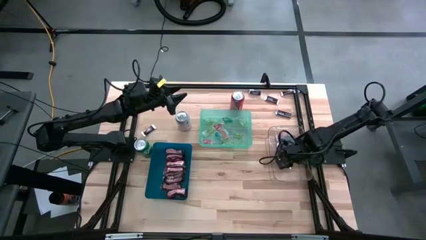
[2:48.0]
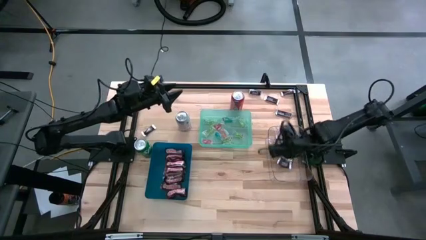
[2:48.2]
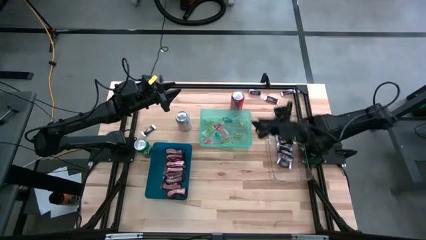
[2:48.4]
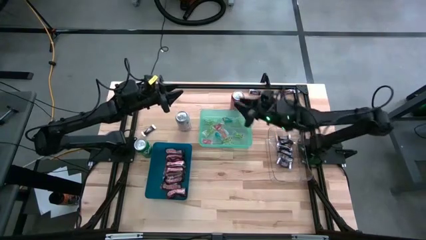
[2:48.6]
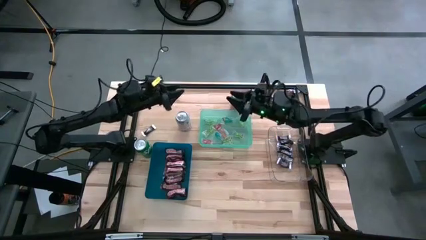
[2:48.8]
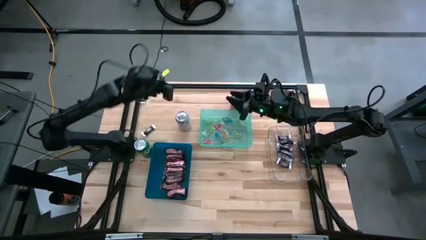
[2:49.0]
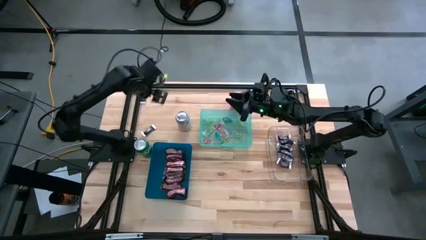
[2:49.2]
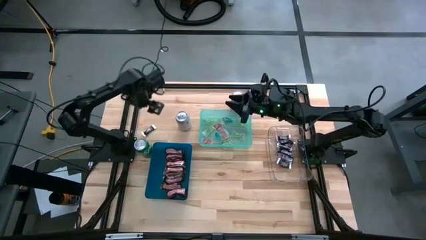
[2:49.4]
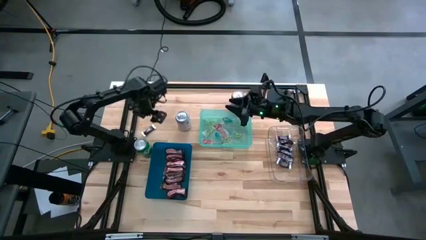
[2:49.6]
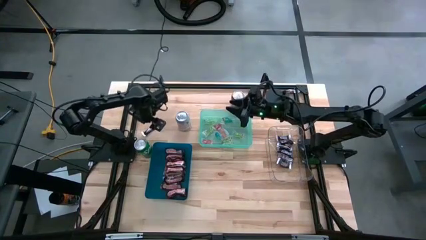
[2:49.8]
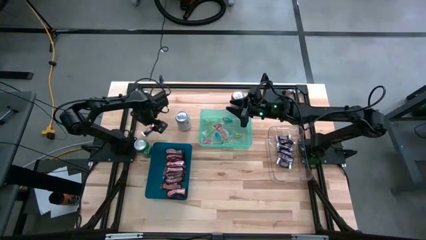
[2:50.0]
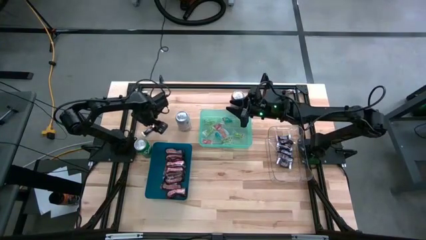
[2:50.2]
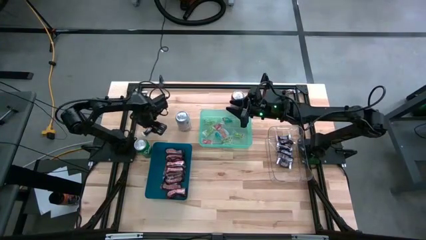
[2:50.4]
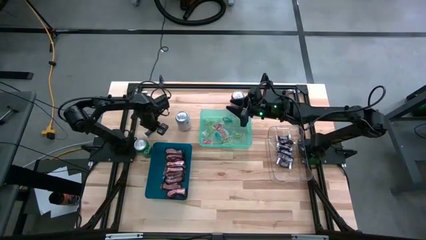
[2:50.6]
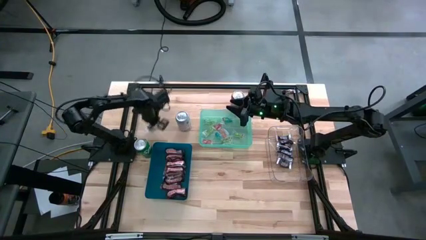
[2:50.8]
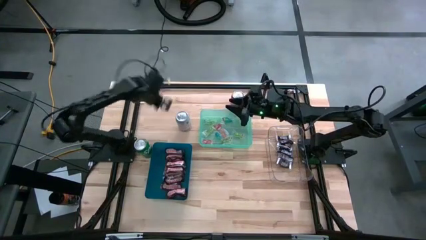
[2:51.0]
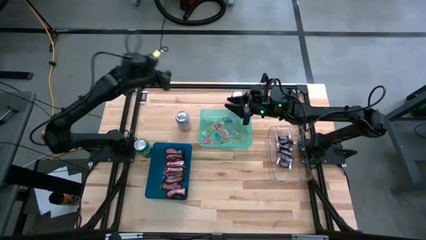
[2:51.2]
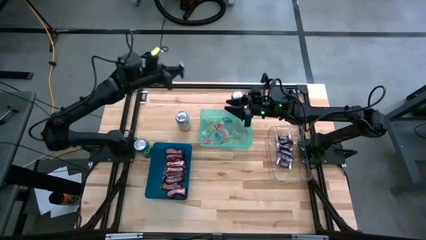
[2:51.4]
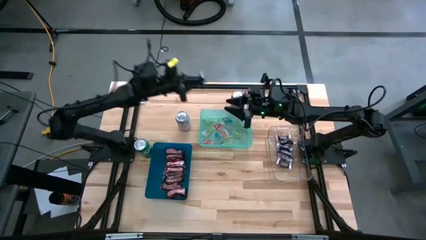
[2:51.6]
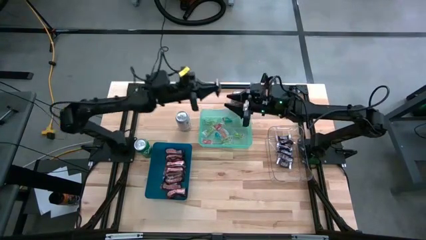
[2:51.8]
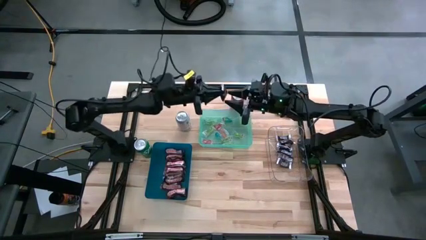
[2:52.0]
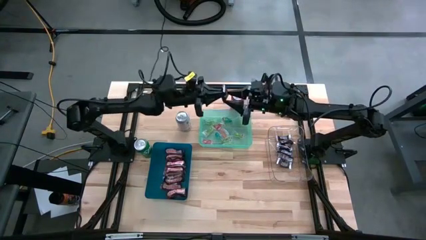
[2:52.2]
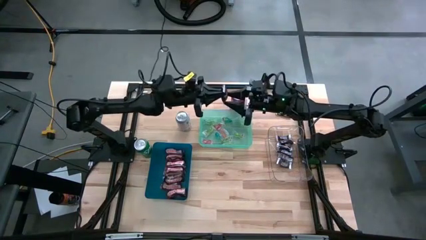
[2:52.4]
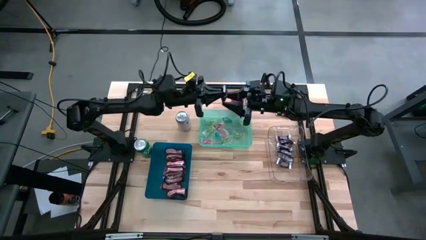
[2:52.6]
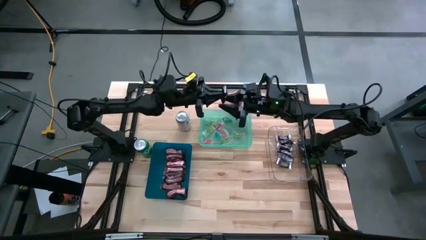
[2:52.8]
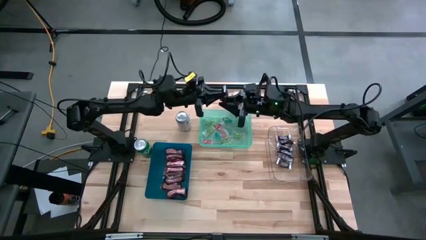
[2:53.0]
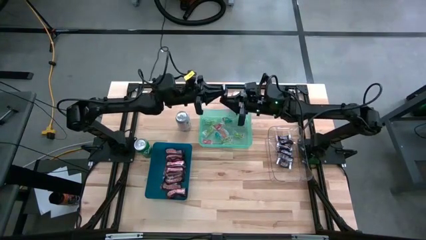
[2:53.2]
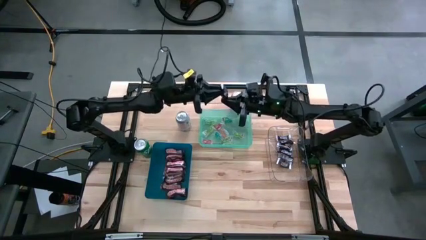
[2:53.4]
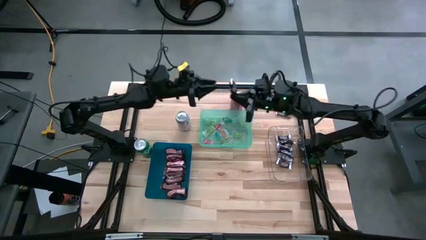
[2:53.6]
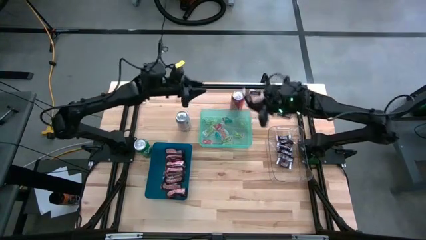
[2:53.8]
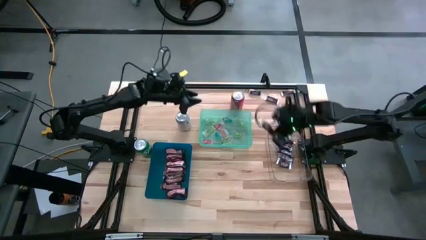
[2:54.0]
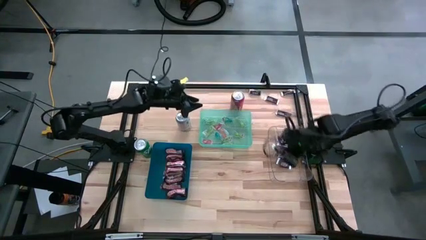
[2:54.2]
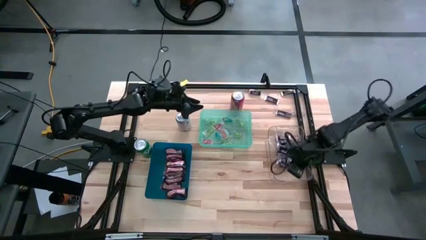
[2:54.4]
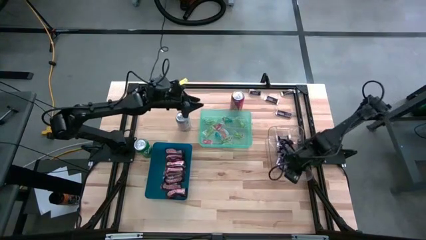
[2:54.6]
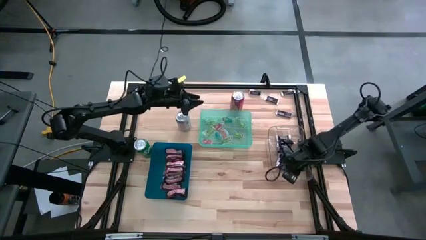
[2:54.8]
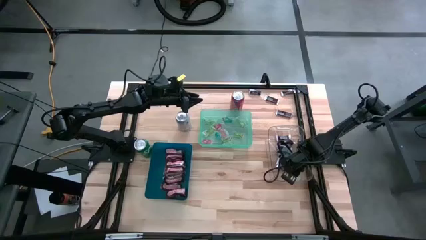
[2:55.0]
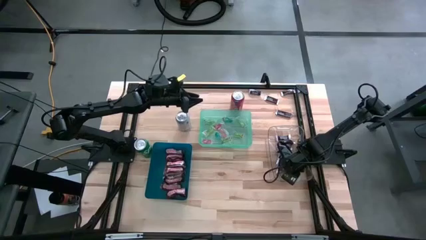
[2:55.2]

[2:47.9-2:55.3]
Task: Organize candy in baskets
Put the white brown chocolate into the transparent bin

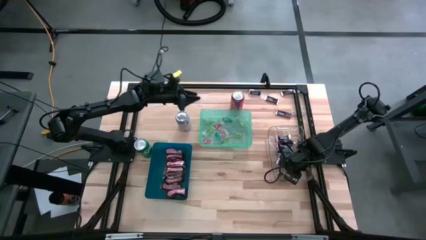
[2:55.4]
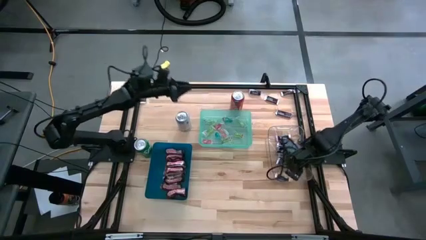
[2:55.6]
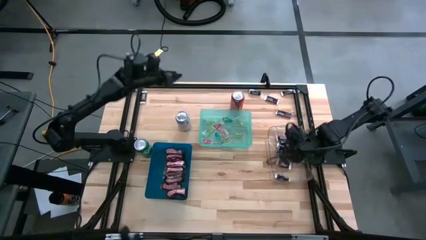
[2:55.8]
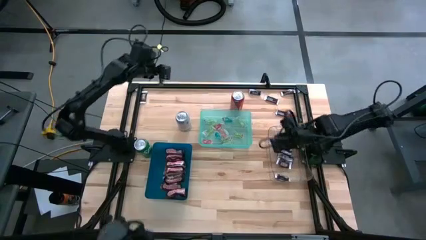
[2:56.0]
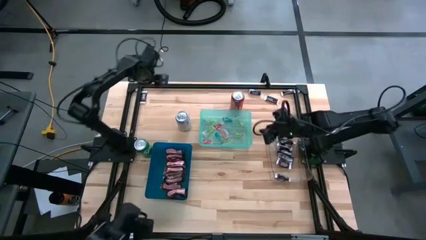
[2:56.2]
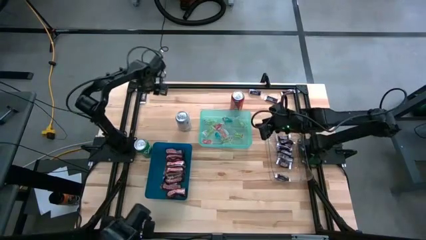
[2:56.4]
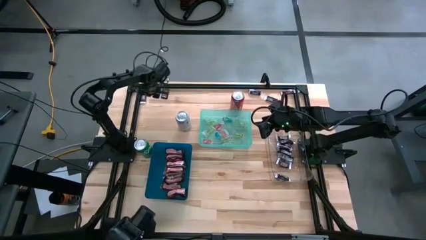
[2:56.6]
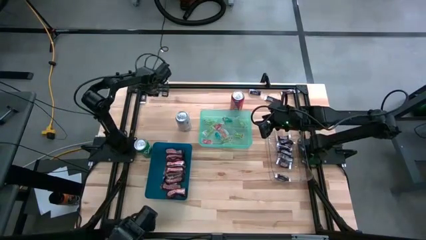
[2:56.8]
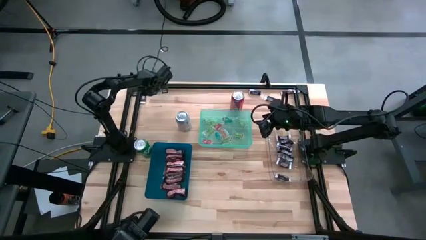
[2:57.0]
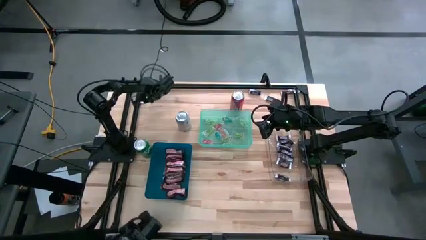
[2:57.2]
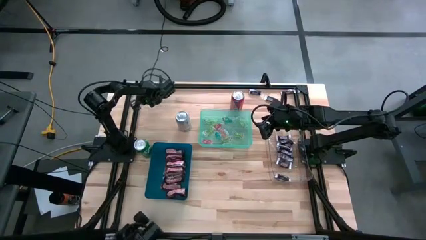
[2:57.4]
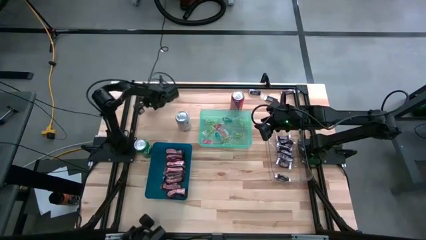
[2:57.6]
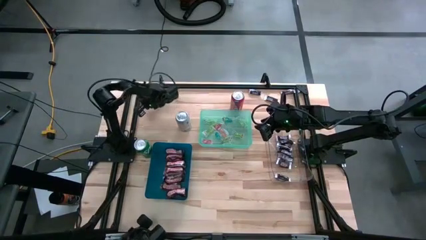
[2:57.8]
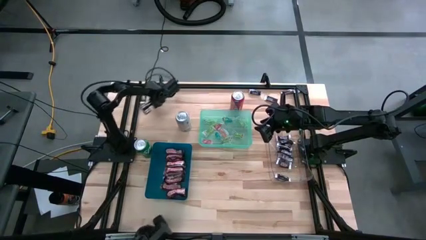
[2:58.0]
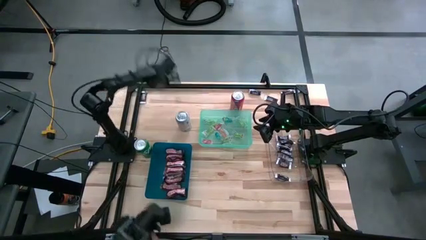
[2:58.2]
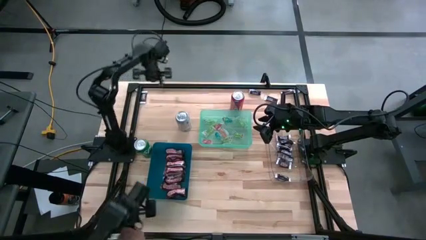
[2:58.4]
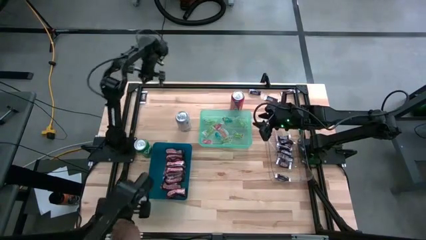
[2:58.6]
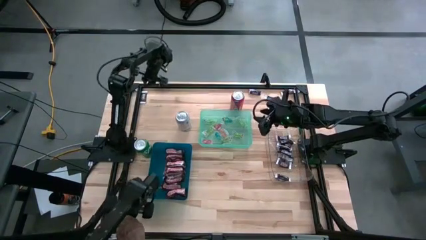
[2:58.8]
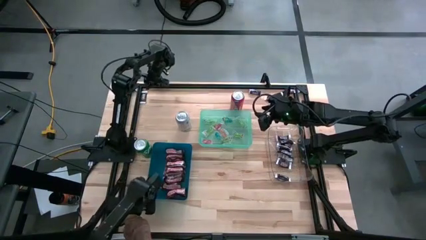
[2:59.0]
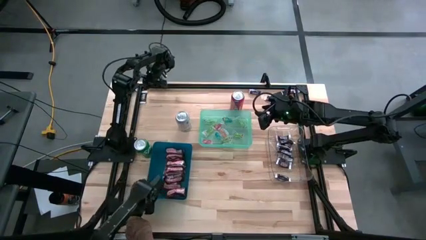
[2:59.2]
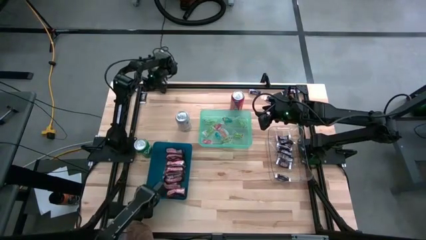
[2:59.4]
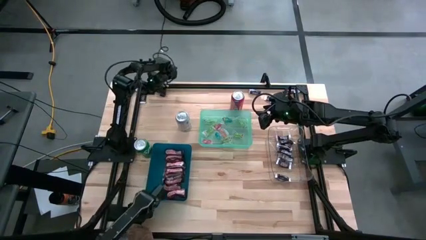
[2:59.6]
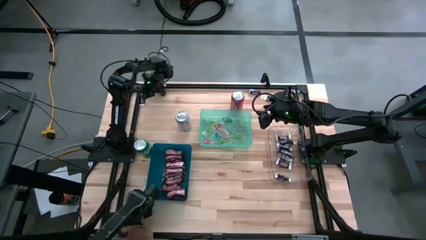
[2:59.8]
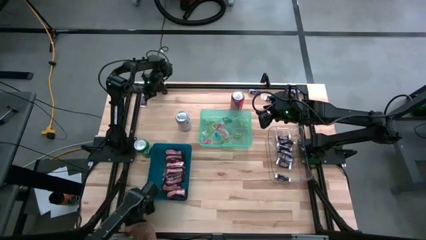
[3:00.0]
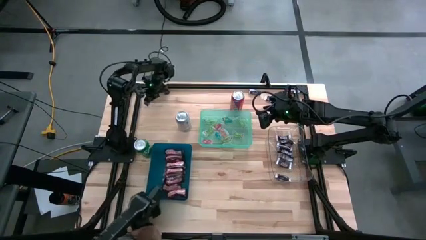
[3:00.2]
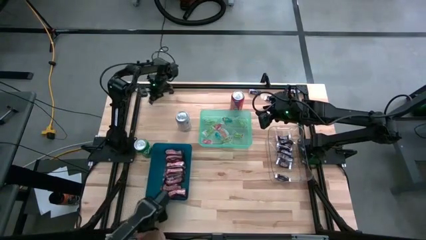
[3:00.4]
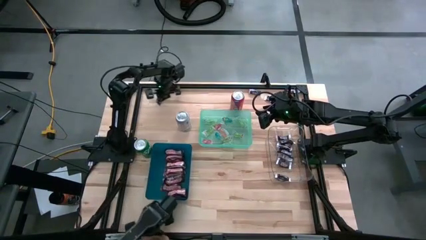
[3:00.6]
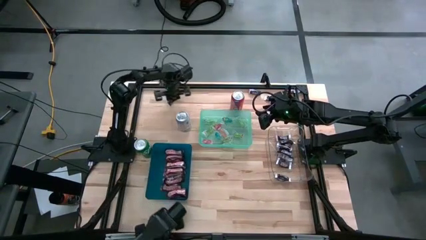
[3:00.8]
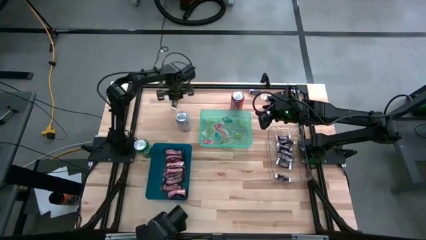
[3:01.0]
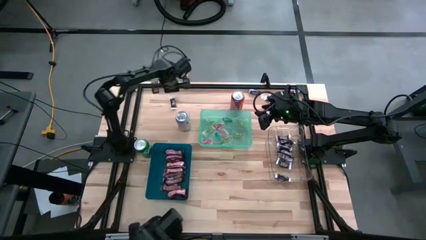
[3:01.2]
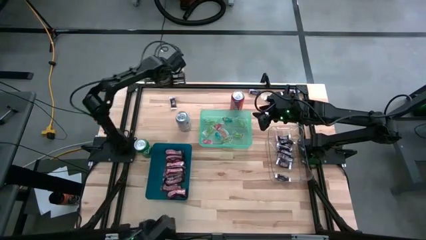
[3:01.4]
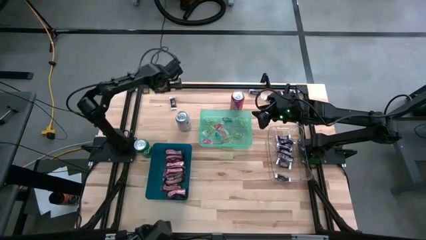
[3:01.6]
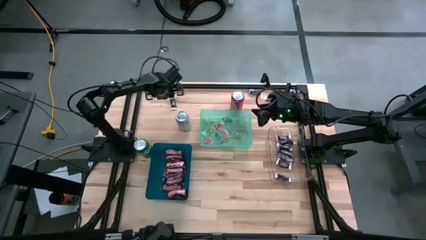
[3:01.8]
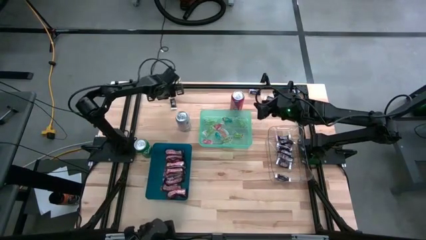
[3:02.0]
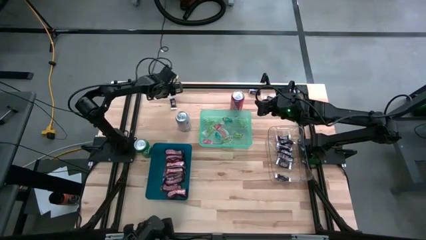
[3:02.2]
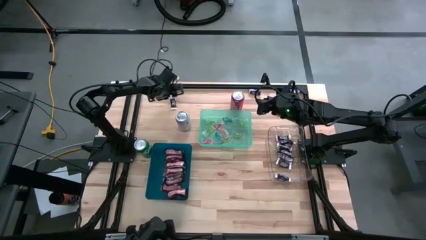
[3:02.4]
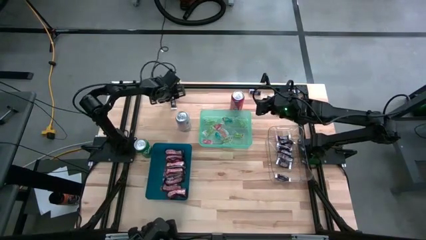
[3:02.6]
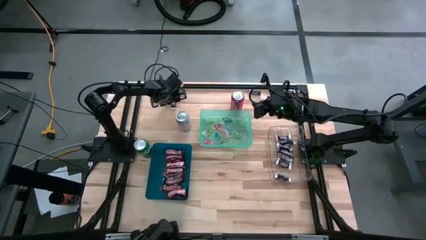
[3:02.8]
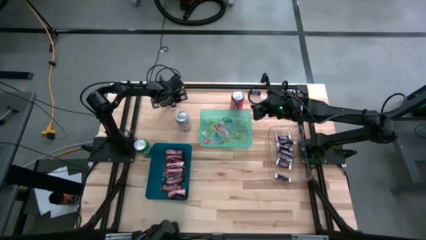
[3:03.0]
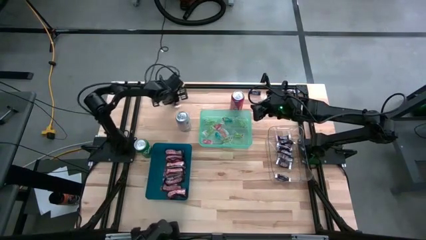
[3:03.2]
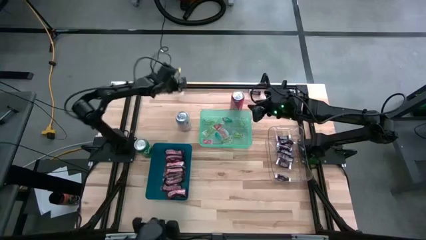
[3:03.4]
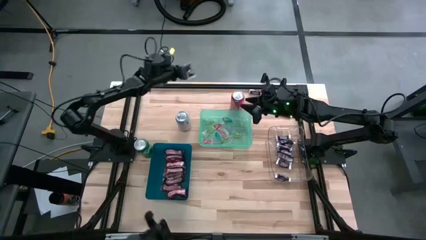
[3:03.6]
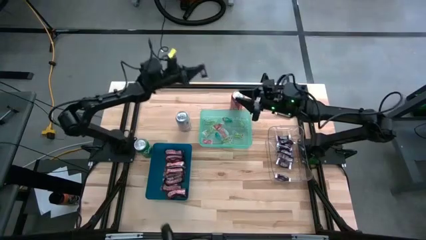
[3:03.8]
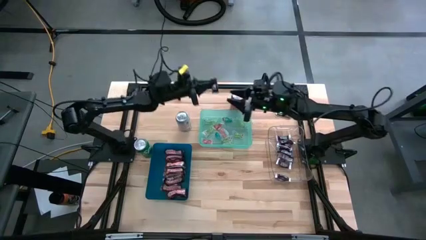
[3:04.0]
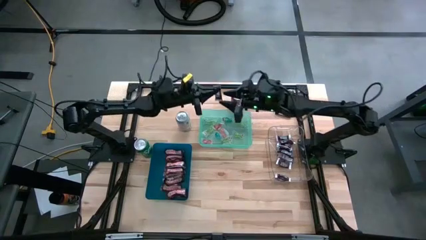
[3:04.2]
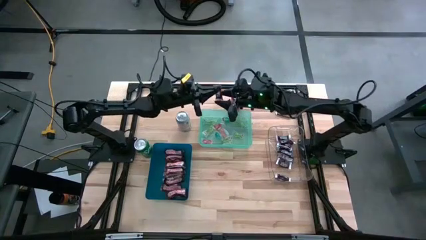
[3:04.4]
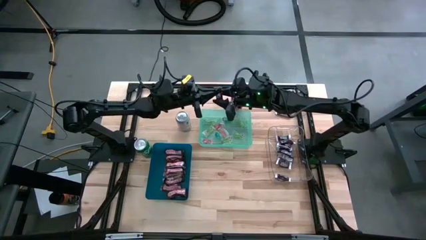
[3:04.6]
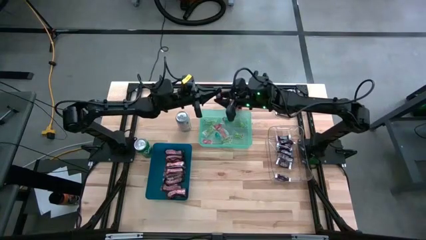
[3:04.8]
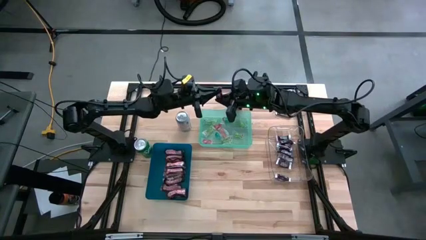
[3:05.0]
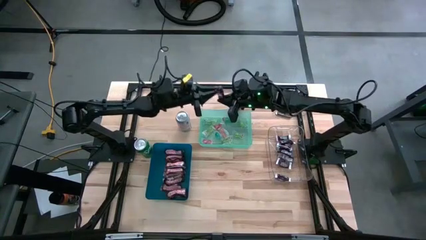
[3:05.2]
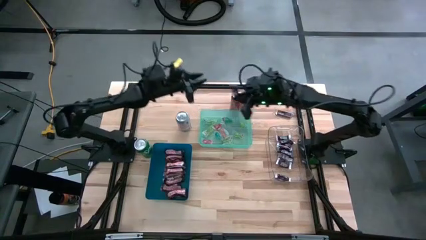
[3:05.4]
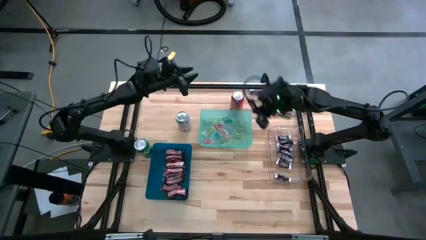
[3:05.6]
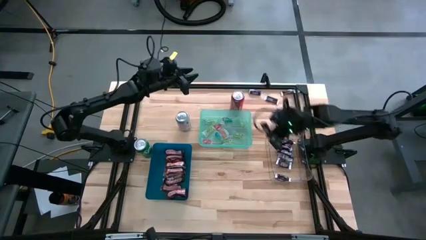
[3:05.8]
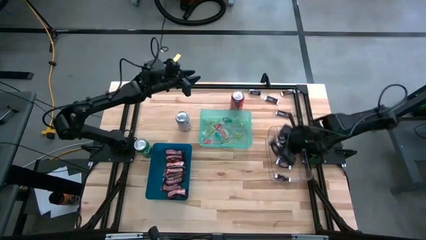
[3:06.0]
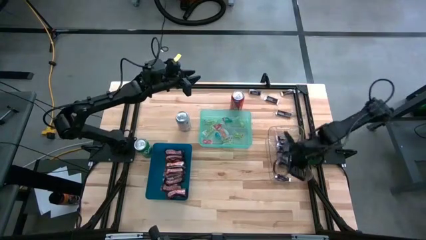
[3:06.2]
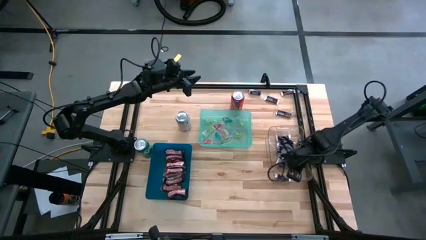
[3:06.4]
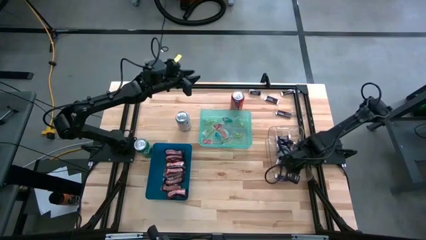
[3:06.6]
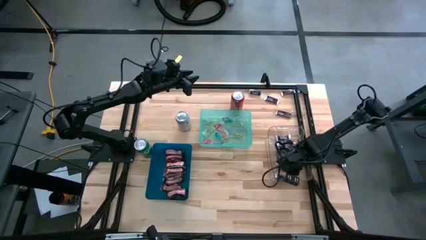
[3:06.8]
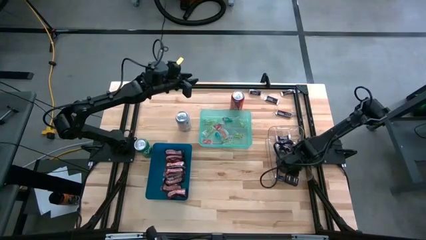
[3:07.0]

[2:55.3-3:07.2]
Put the white brown chocolate into the transparent bin
